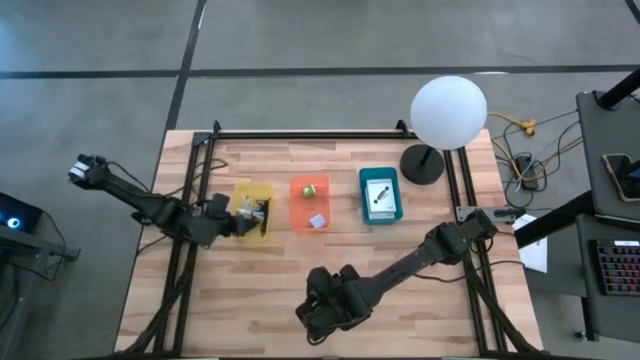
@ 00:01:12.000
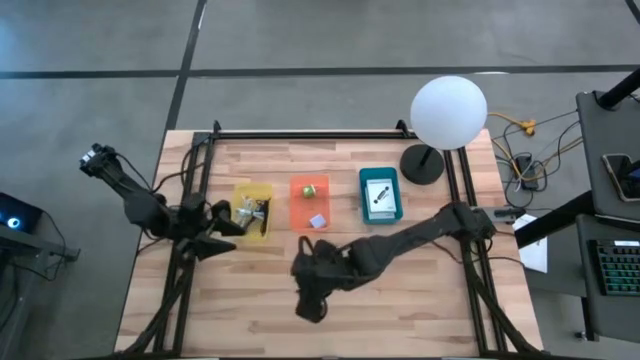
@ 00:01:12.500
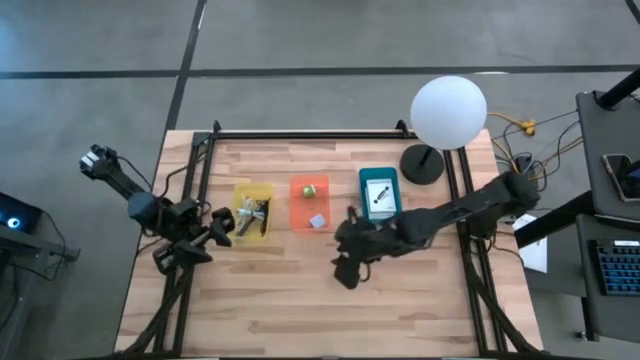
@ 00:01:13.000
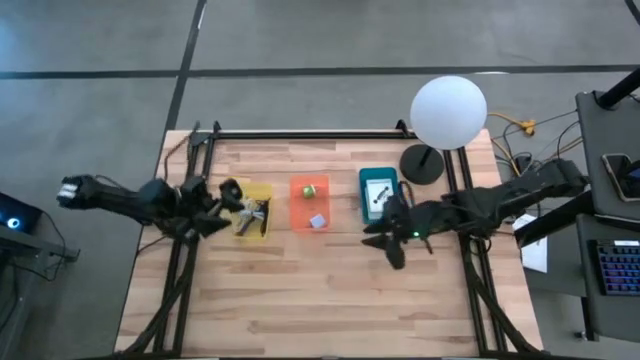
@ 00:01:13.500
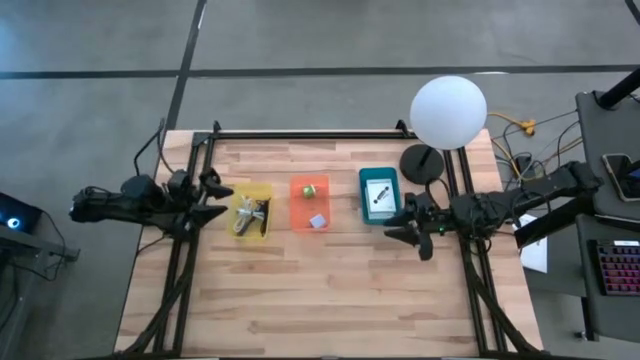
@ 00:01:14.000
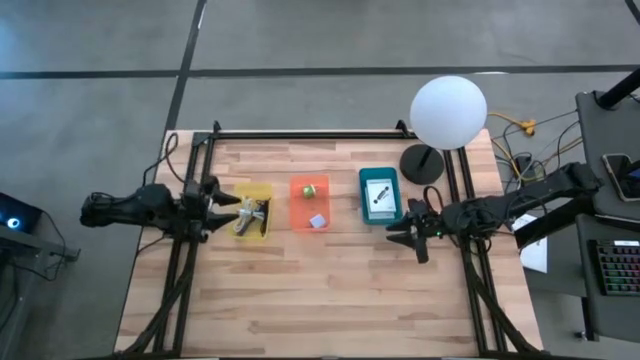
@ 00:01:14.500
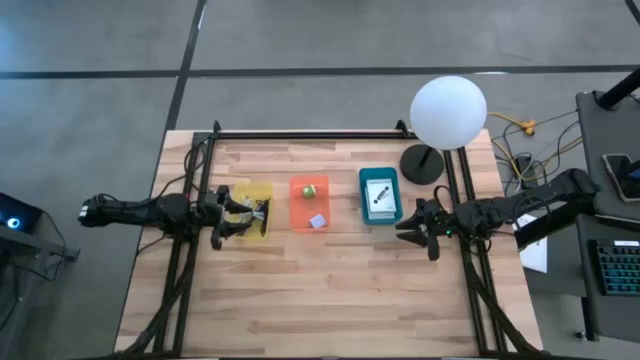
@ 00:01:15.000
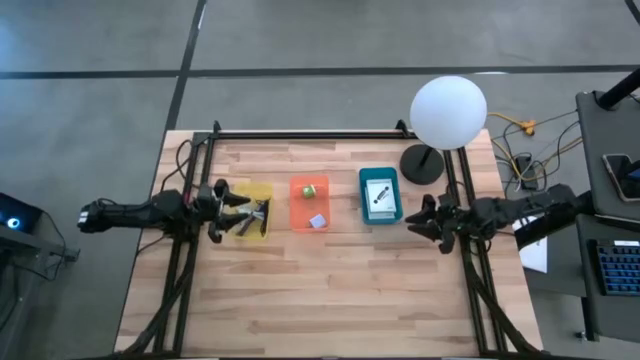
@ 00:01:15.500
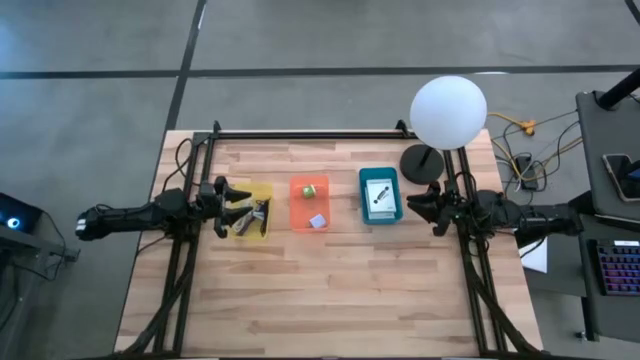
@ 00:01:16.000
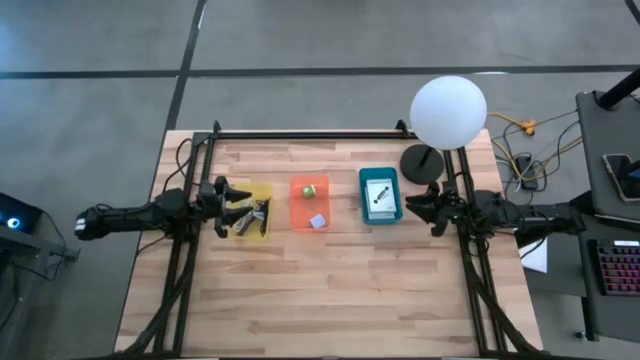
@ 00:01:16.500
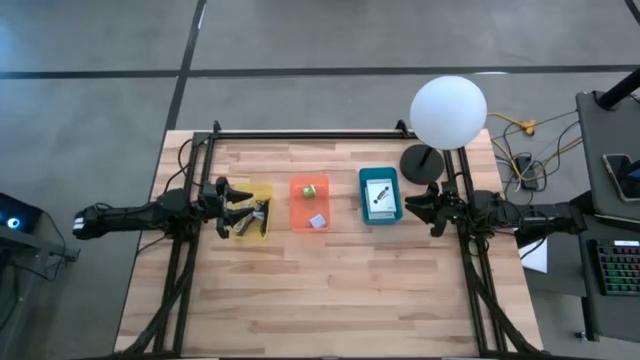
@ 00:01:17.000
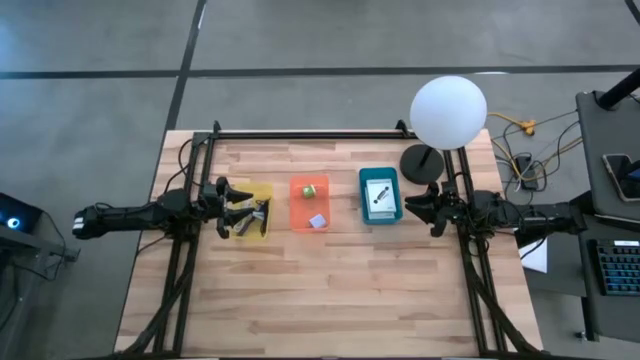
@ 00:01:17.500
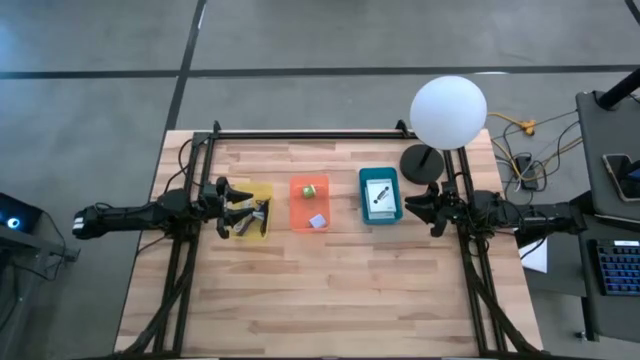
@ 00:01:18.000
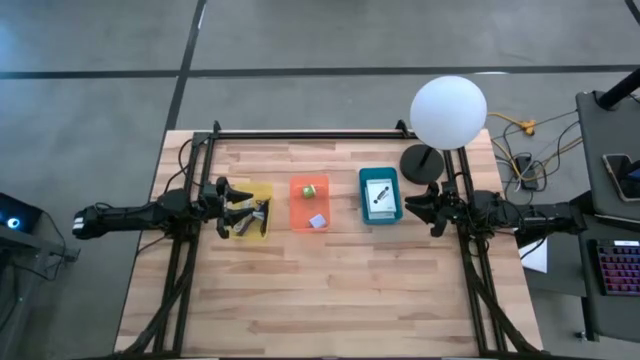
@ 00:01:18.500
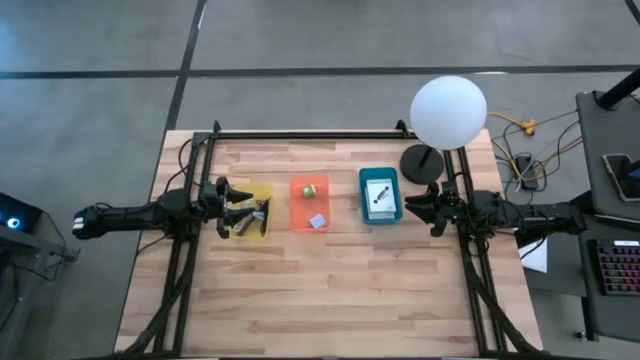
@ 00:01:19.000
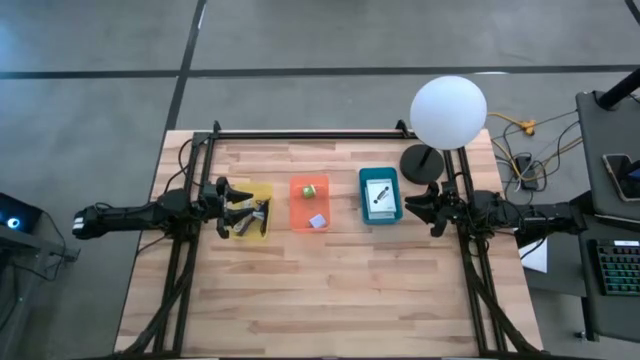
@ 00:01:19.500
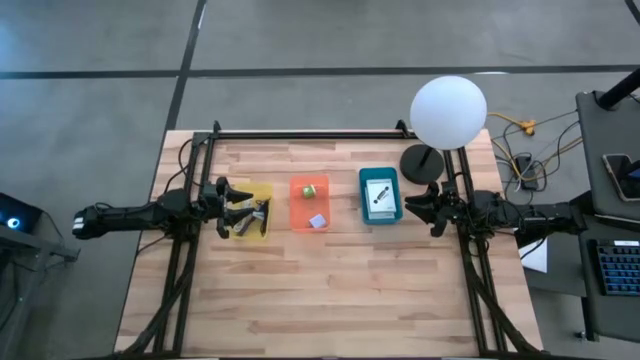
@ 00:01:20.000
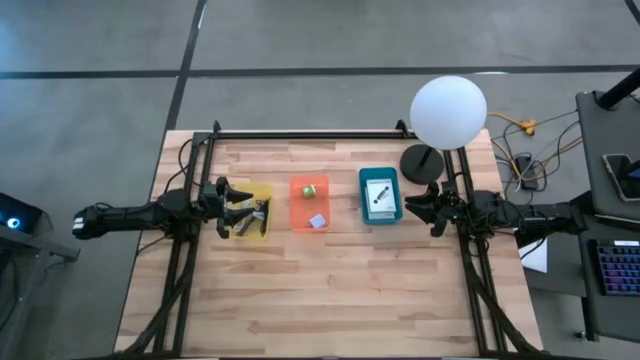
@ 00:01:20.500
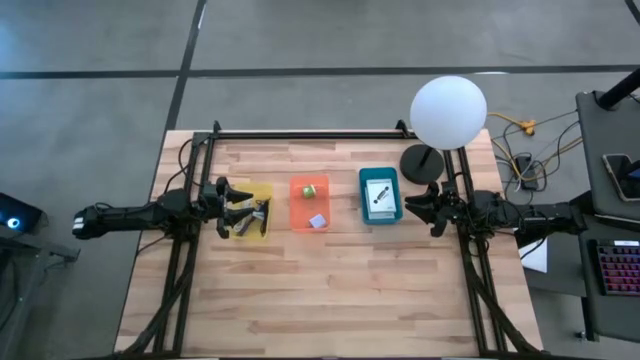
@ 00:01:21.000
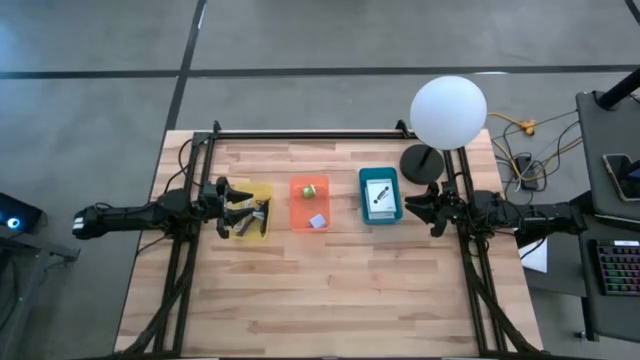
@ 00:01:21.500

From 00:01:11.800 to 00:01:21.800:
Task: Pick and place items into bin
Return to Home Position

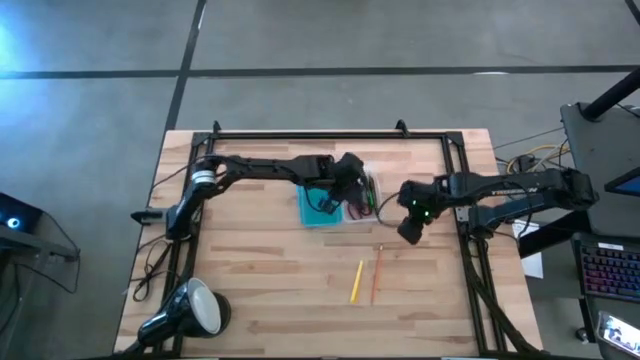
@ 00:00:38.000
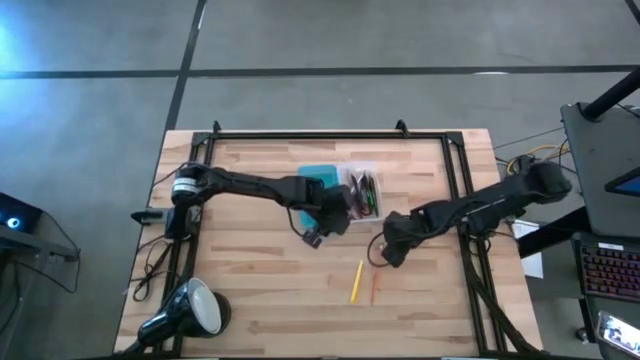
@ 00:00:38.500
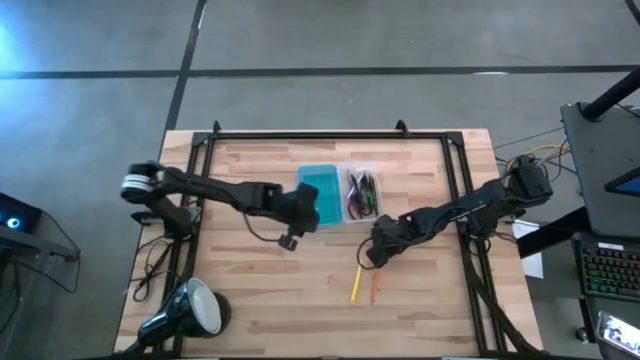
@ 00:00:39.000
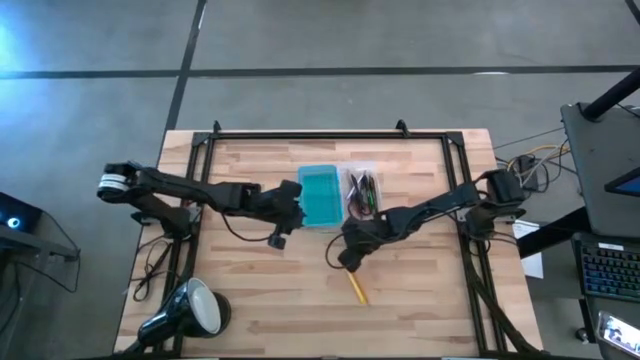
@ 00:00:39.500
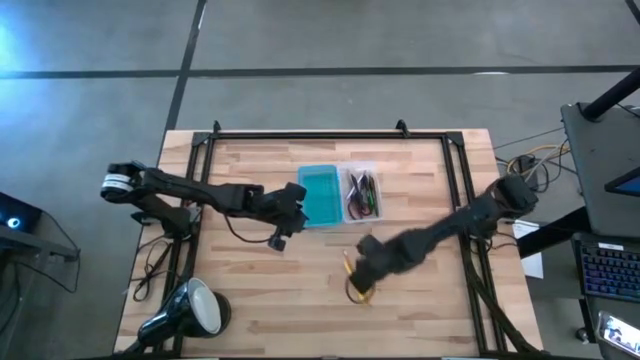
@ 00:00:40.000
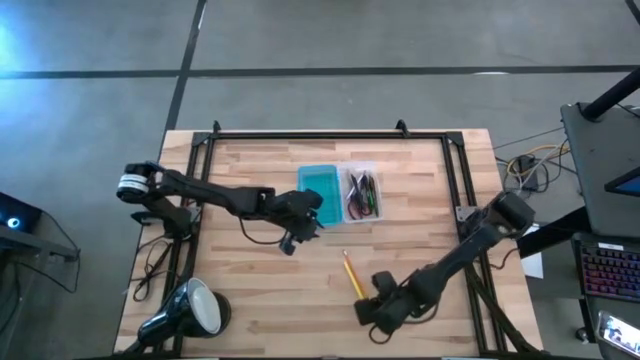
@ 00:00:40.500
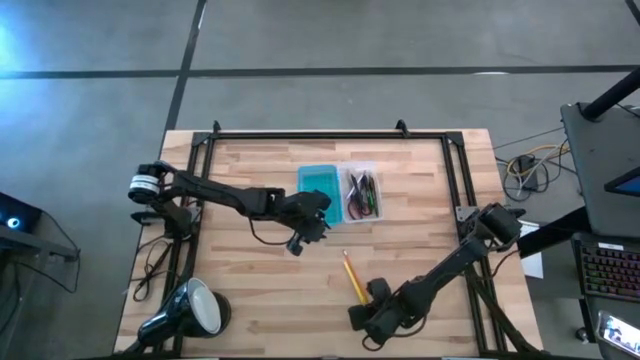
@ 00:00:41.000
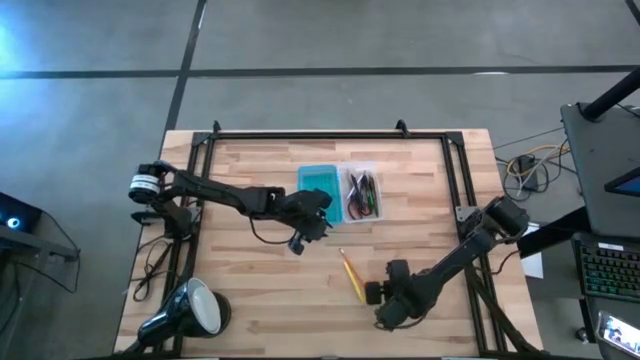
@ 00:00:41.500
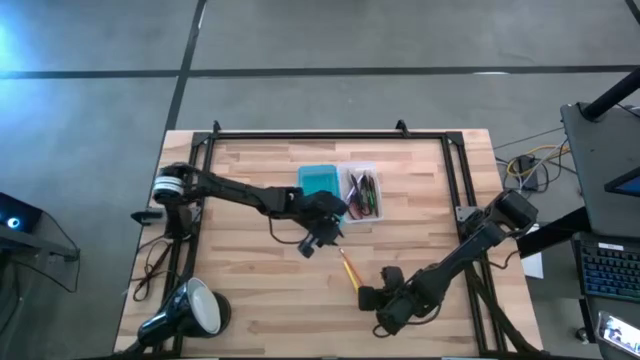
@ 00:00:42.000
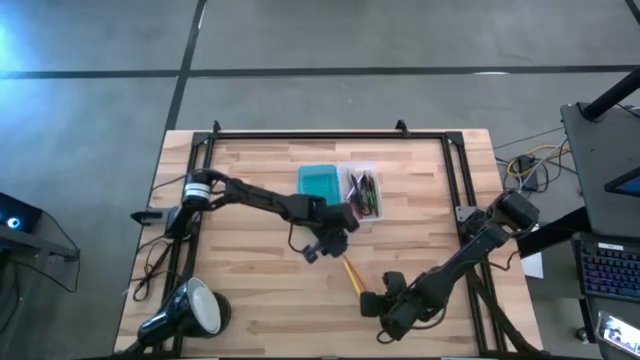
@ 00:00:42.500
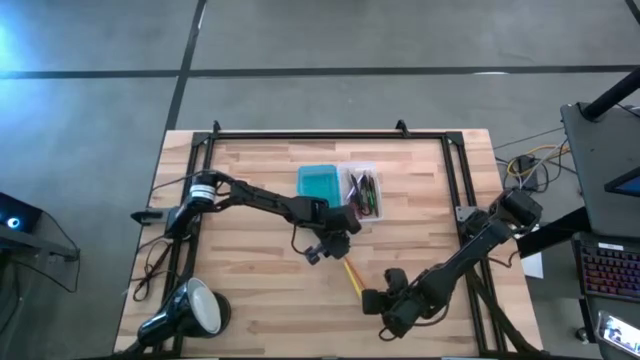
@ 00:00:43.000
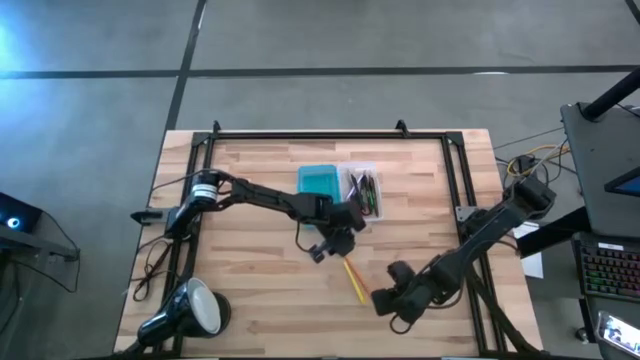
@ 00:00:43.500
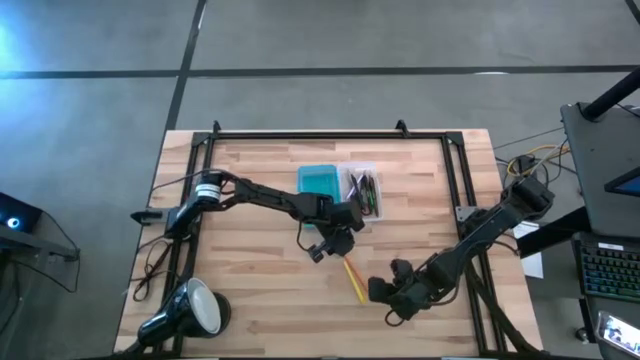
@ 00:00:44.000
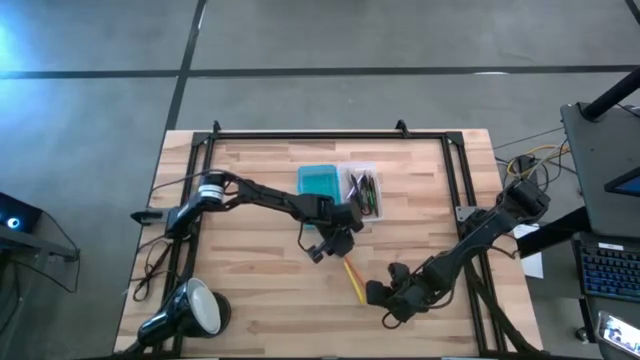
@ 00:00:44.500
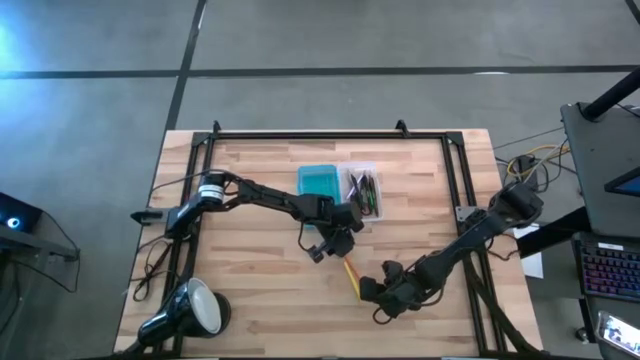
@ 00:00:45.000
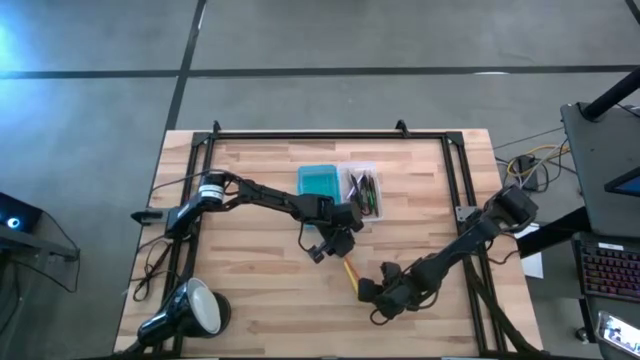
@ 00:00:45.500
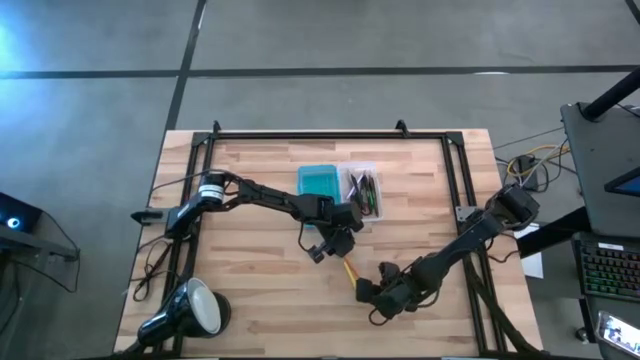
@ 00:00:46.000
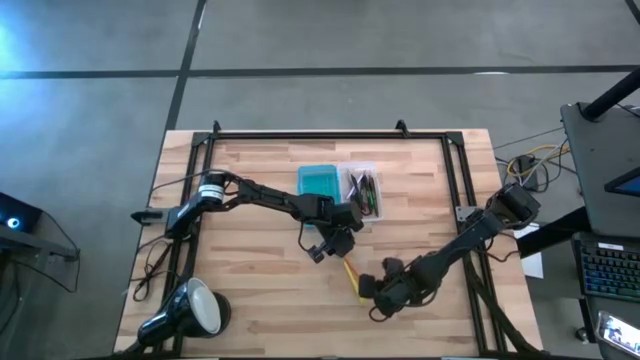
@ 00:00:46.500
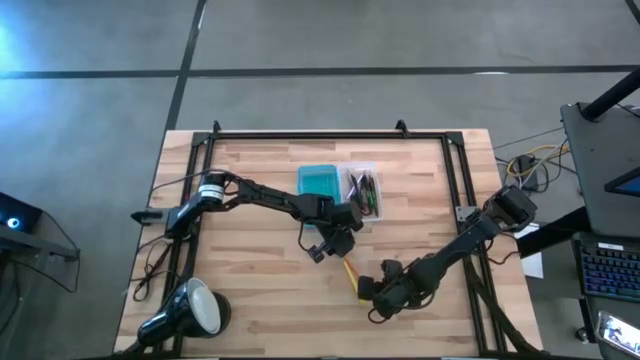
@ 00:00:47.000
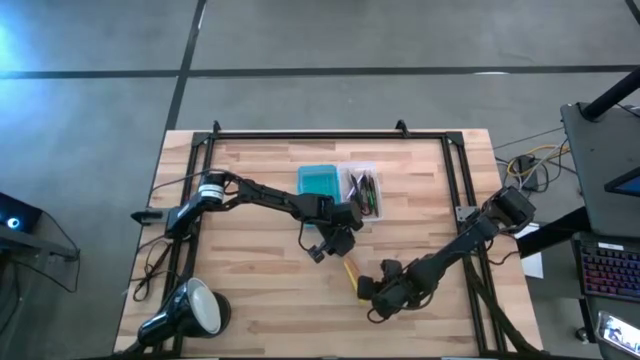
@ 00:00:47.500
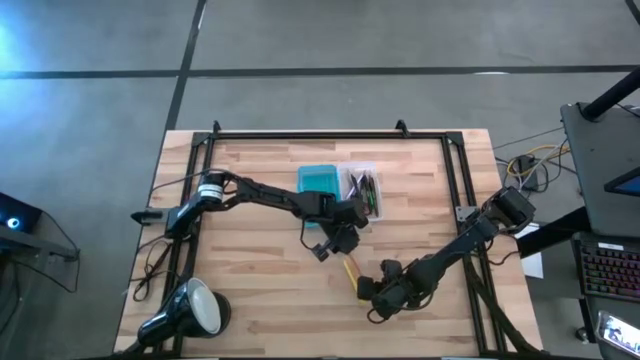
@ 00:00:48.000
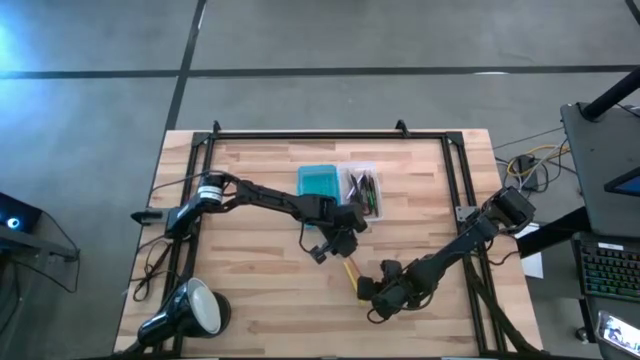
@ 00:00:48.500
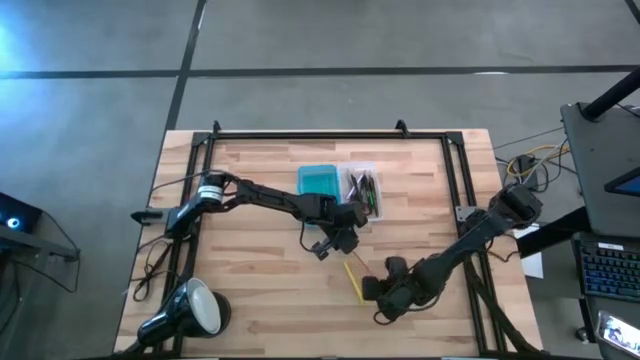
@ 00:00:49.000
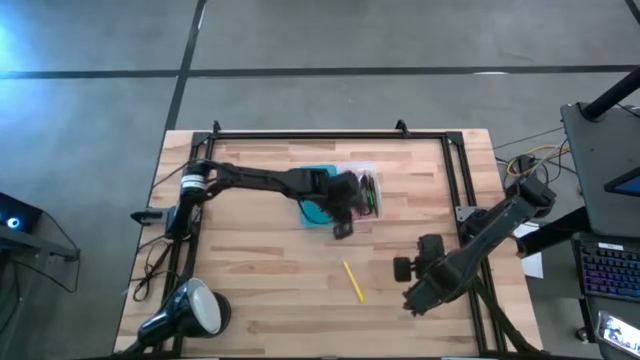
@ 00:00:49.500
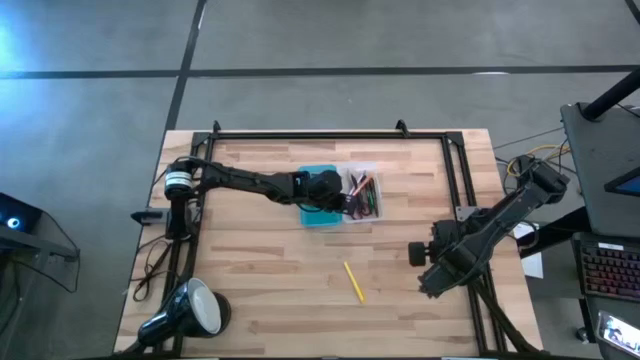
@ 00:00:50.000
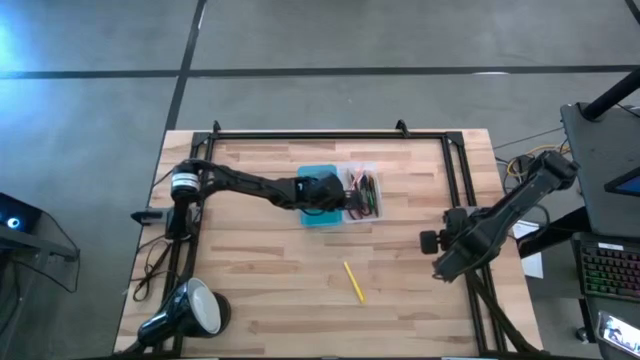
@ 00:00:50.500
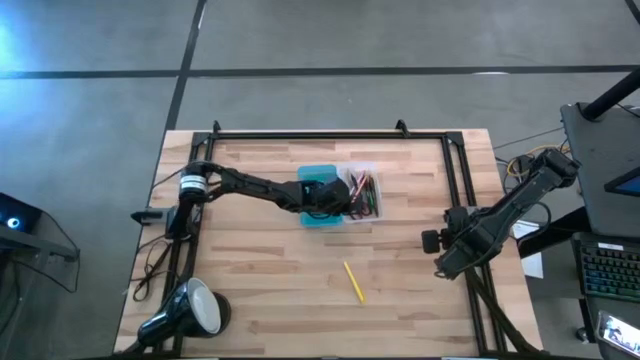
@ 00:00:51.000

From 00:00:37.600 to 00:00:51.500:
Task: Pick & place school supplies into a supply box
Put the orange pencil into the blue supply box
